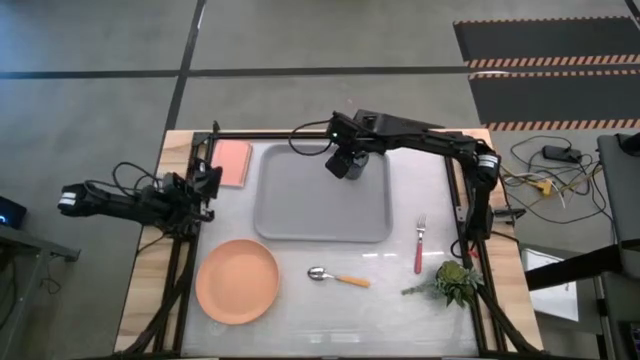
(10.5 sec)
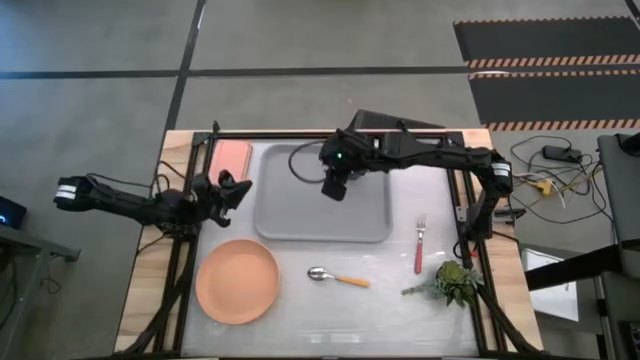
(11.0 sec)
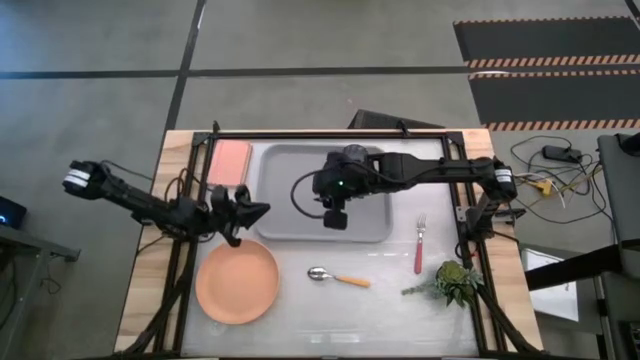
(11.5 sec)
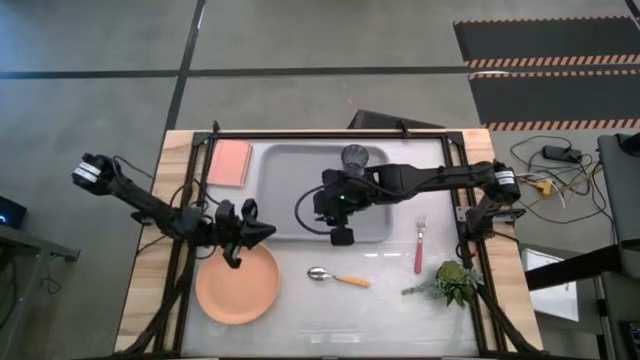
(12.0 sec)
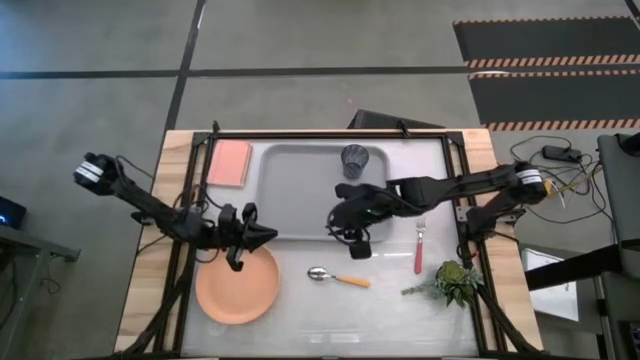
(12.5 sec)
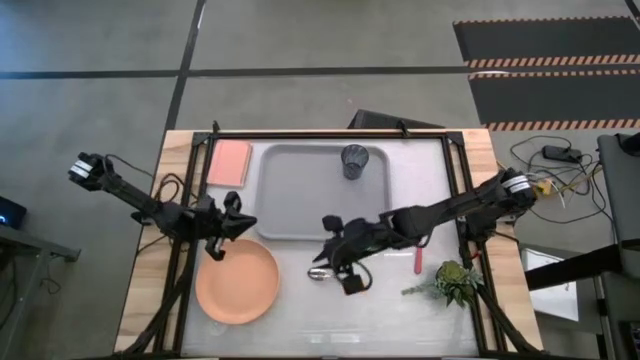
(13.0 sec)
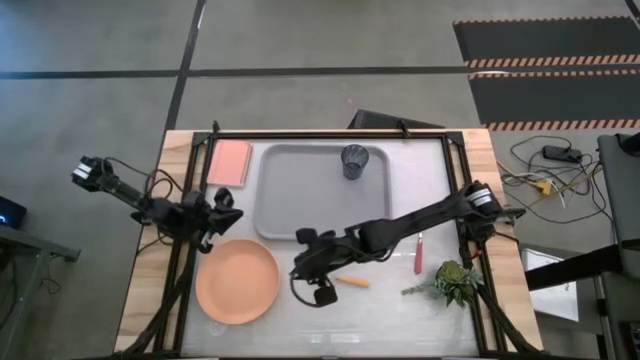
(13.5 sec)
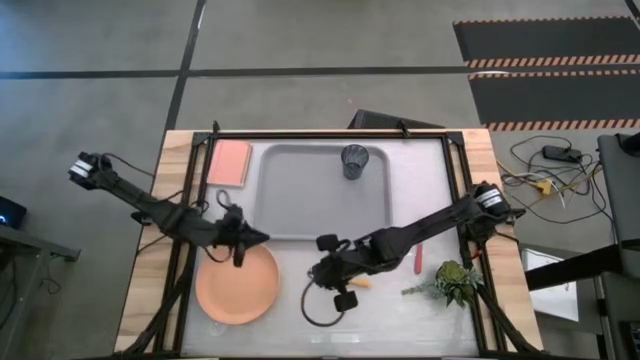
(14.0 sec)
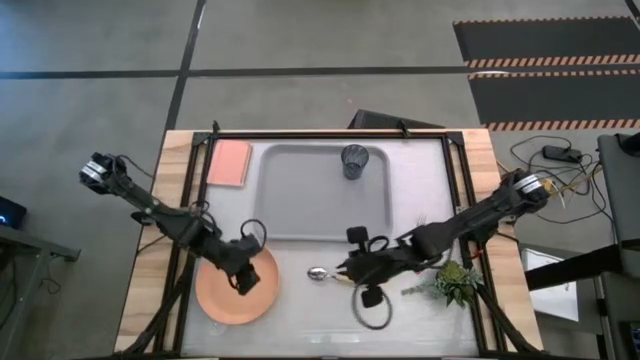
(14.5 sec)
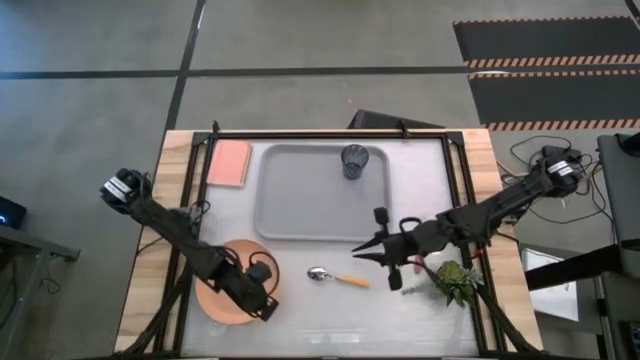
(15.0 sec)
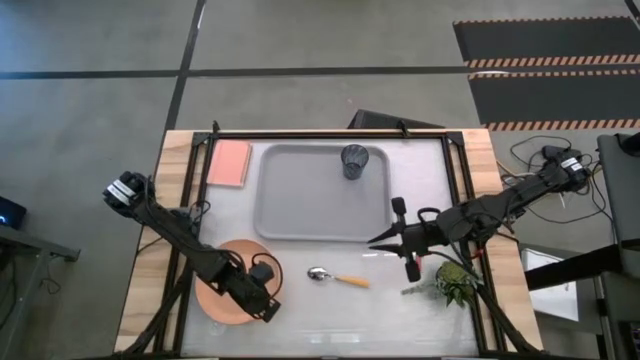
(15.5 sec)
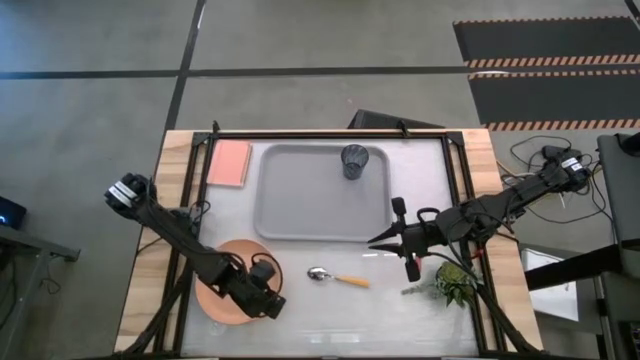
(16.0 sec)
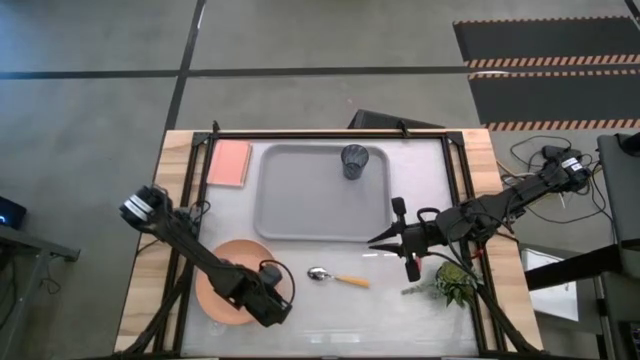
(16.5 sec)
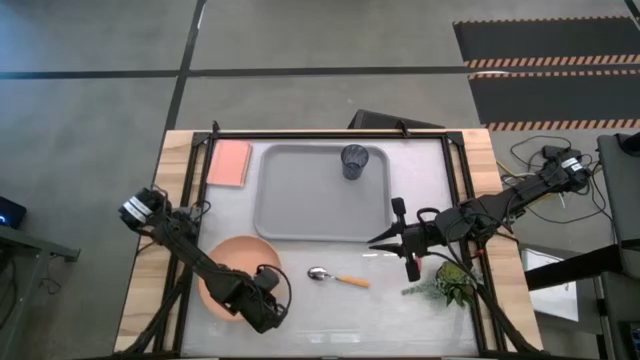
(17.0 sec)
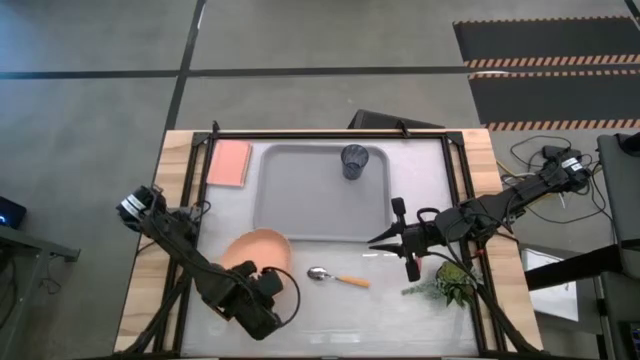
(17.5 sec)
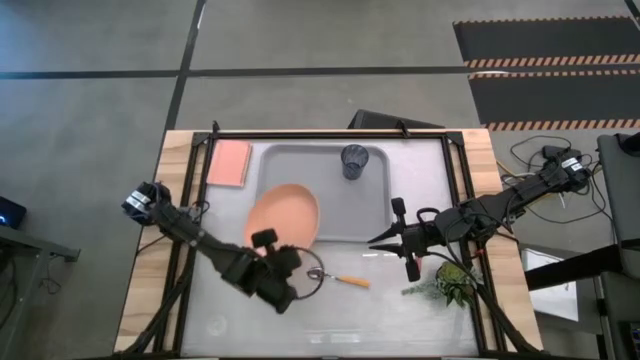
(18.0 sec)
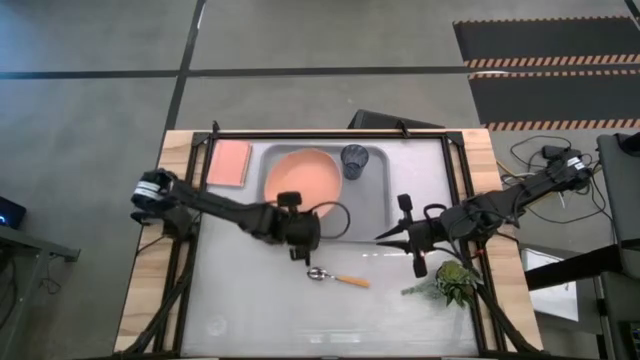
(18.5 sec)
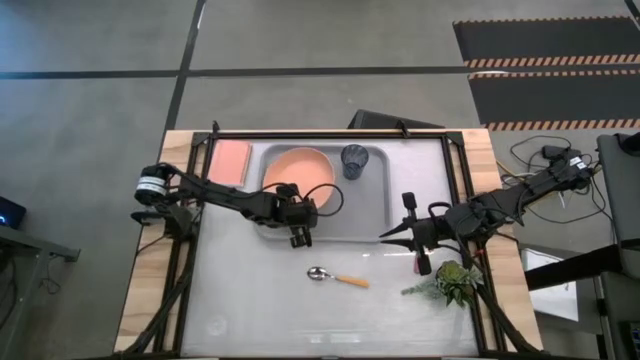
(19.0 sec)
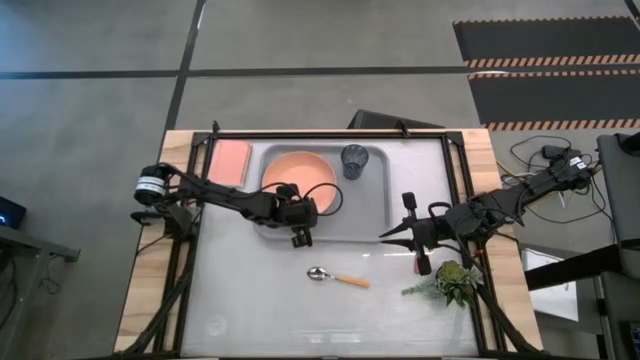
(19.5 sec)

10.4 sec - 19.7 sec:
Task: Pick and place plate/cup/fork/spoon on tray
Put the orange plate on the gray tray

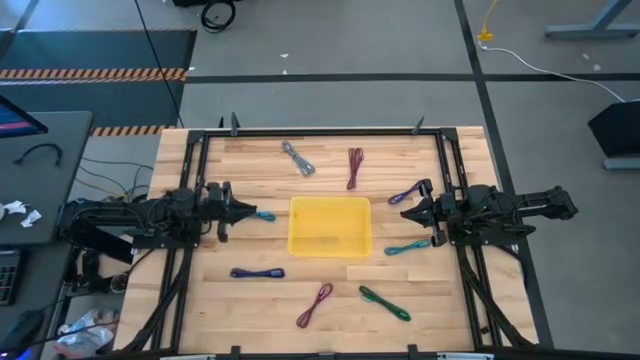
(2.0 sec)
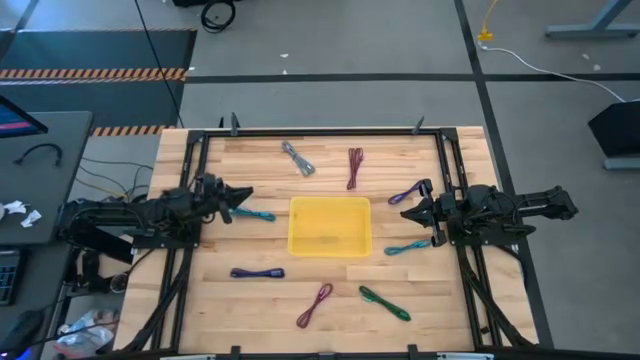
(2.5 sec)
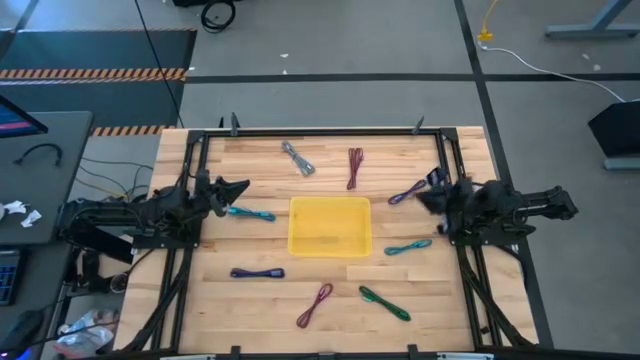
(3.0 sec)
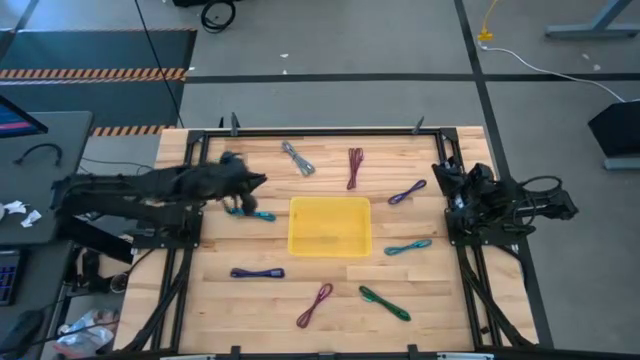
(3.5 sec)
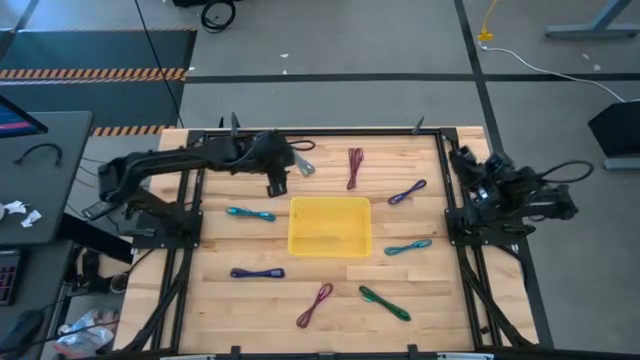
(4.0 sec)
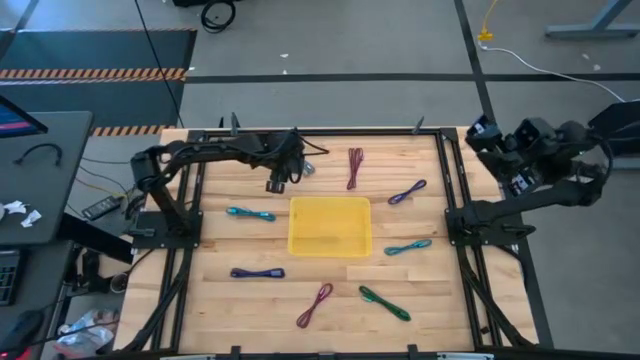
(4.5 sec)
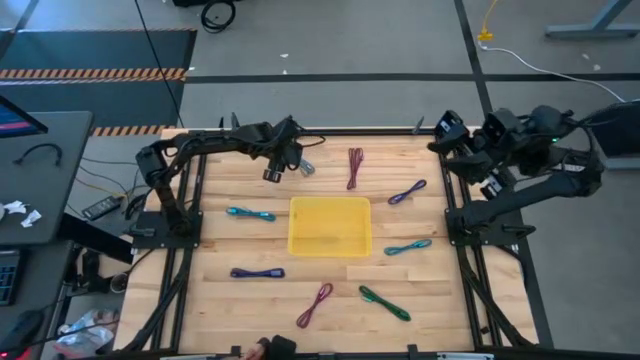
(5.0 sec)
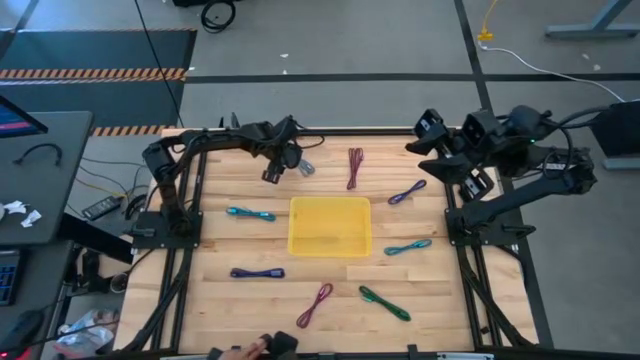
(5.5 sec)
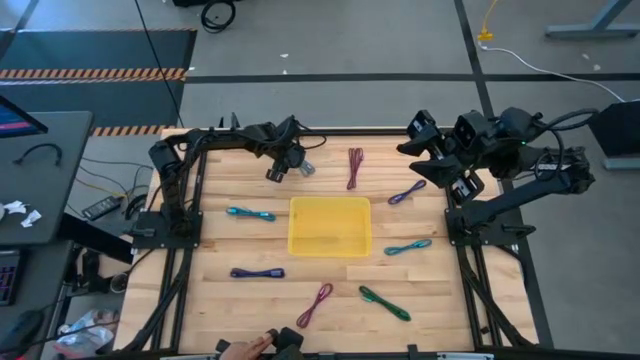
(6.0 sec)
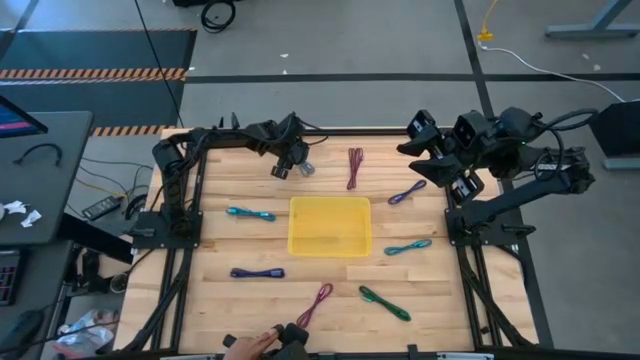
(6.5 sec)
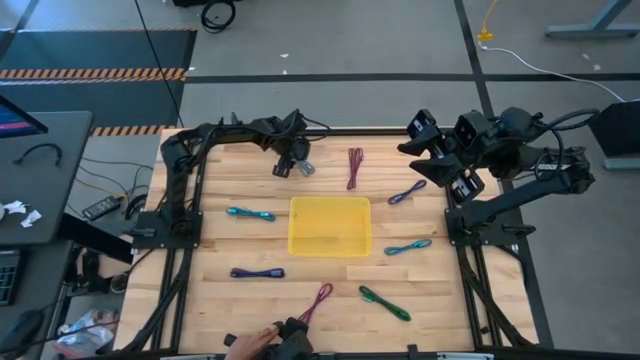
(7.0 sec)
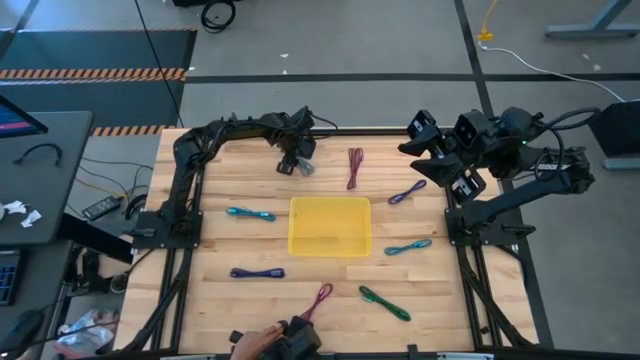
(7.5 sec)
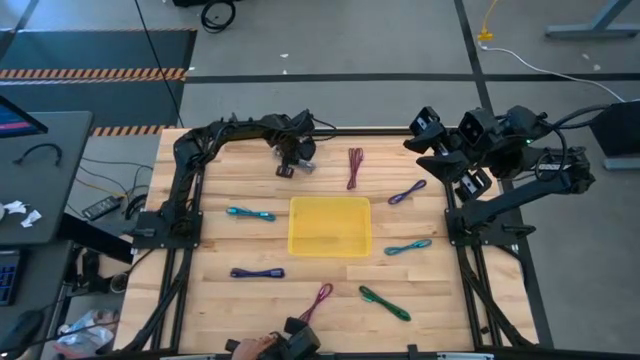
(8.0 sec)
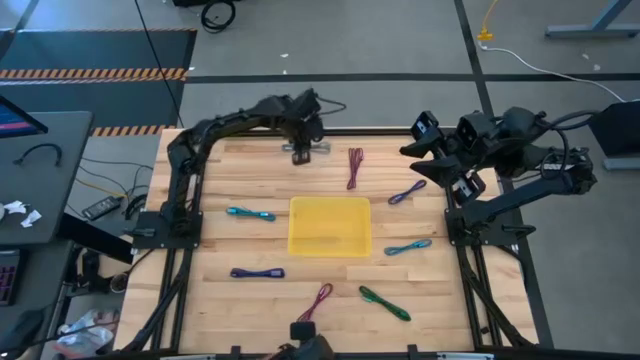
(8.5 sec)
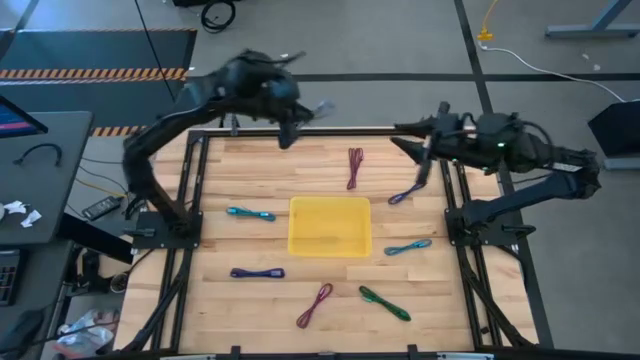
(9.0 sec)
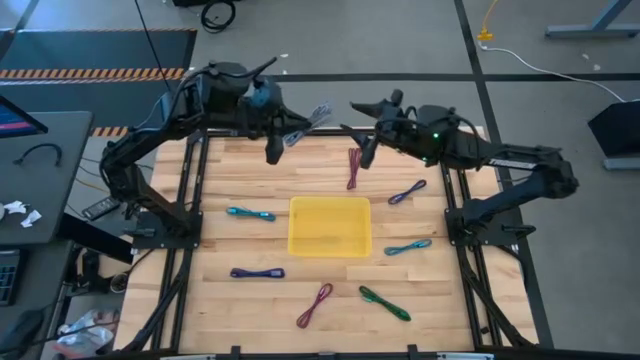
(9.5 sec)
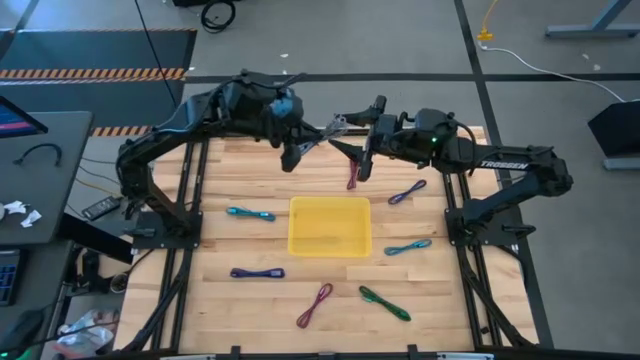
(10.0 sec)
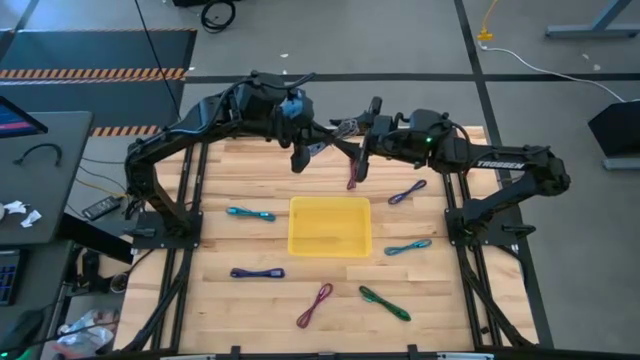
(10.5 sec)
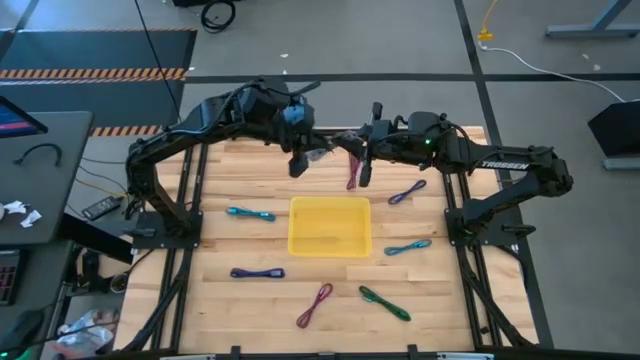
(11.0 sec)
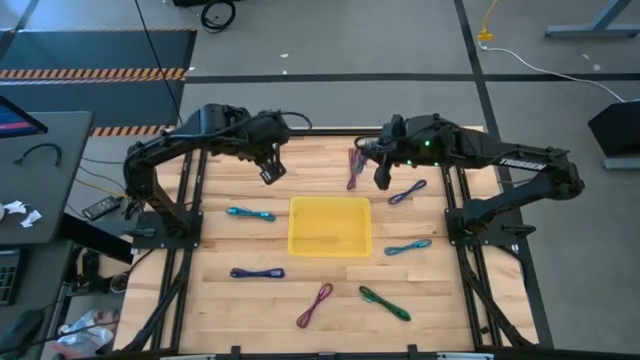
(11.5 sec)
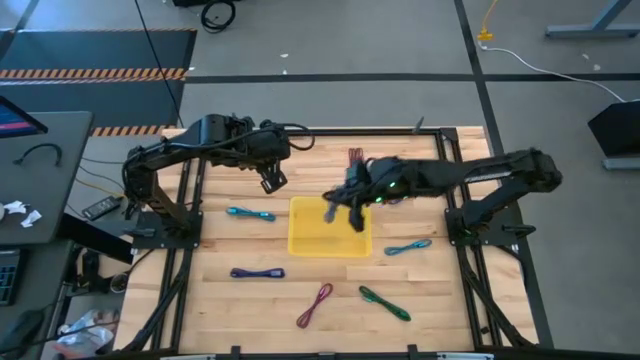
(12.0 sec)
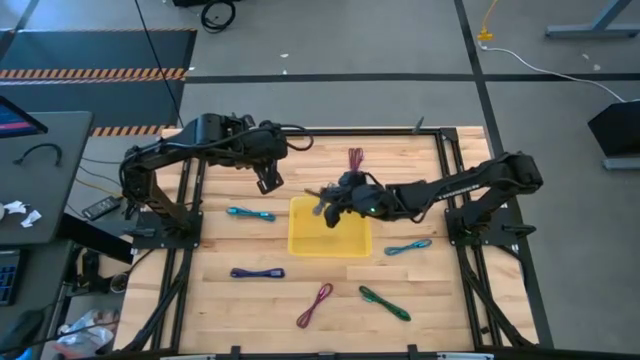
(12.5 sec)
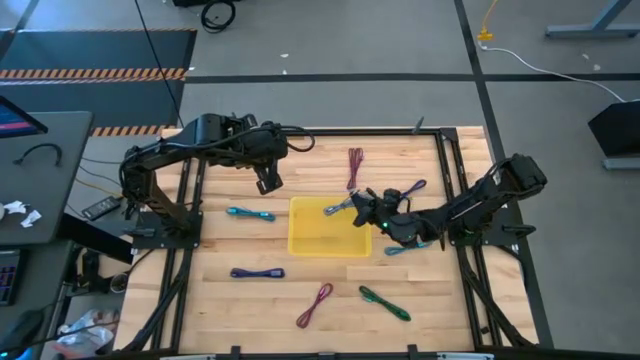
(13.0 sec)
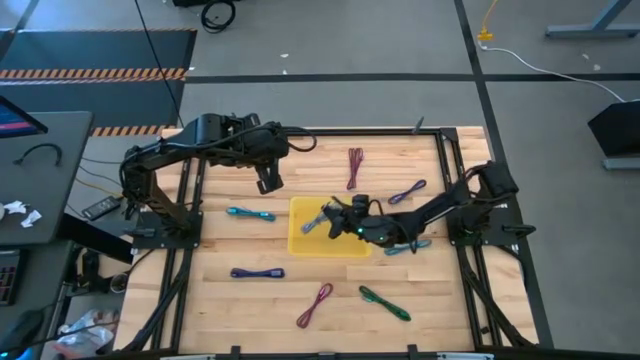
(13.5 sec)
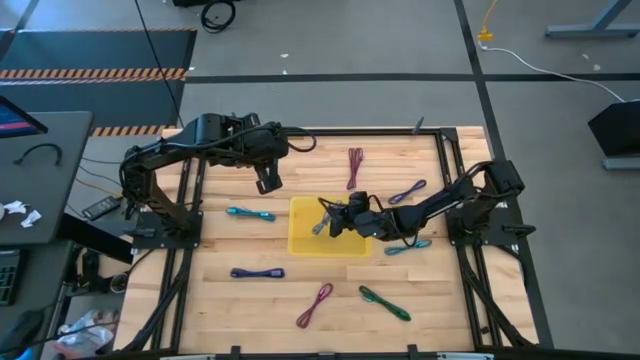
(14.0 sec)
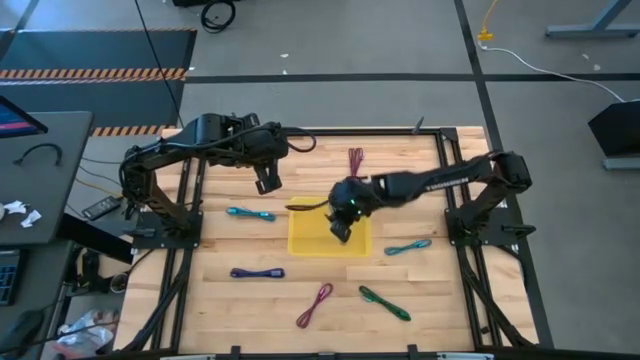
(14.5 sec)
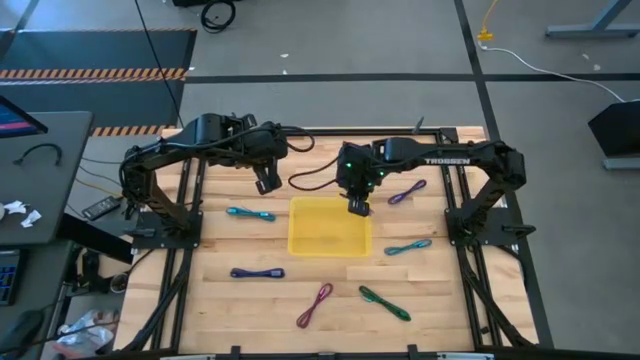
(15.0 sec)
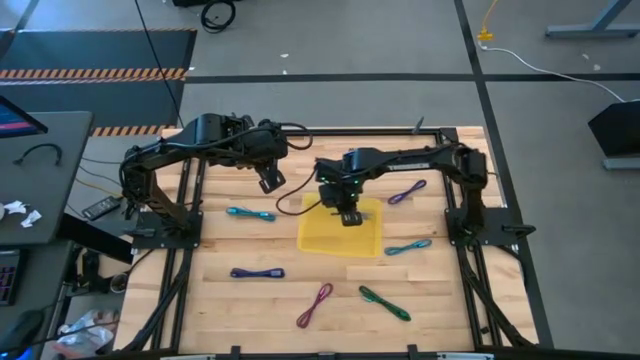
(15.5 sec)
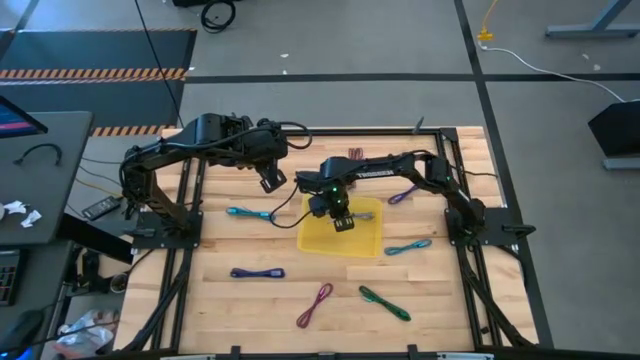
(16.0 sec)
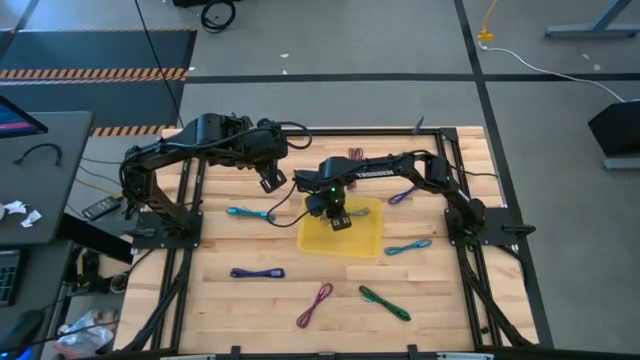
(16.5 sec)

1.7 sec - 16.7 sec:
Task: Pick and place USB-C Cables
Put the white and black charger cable into the yellow bin
